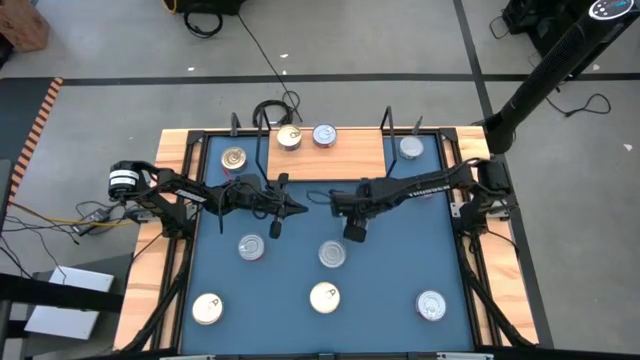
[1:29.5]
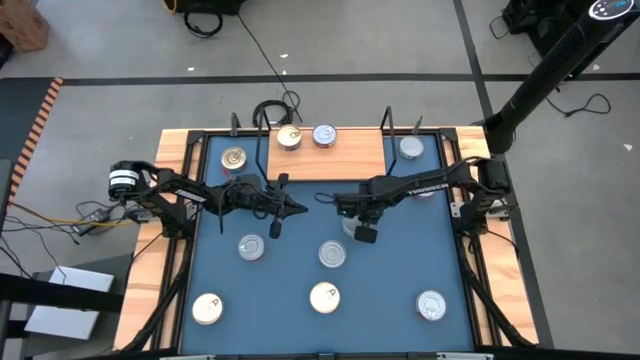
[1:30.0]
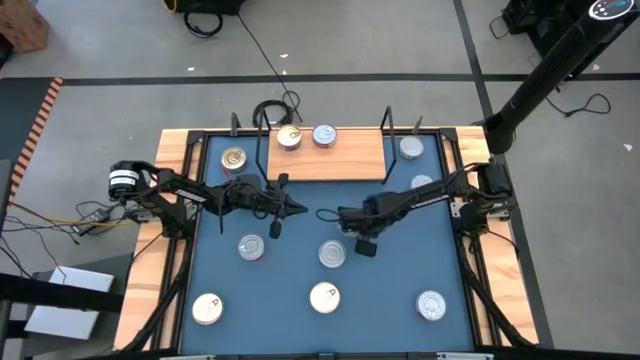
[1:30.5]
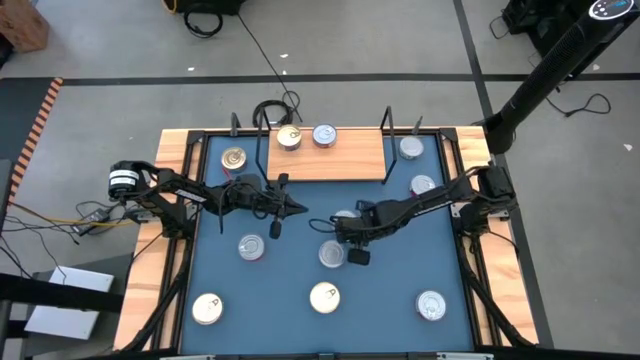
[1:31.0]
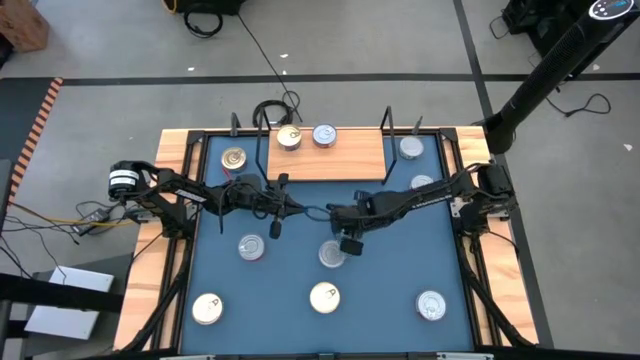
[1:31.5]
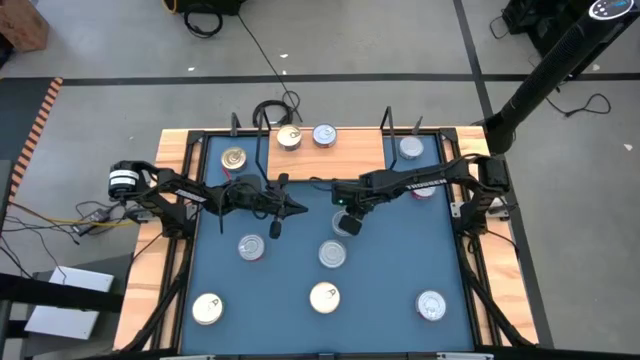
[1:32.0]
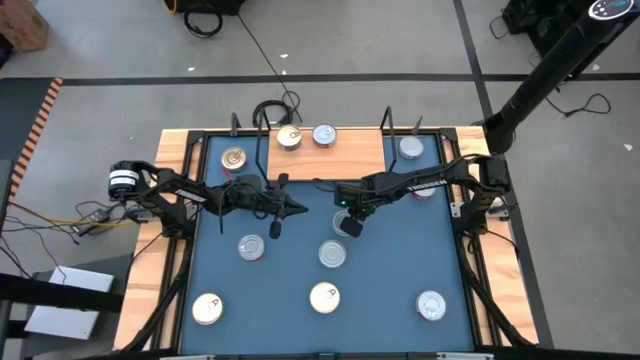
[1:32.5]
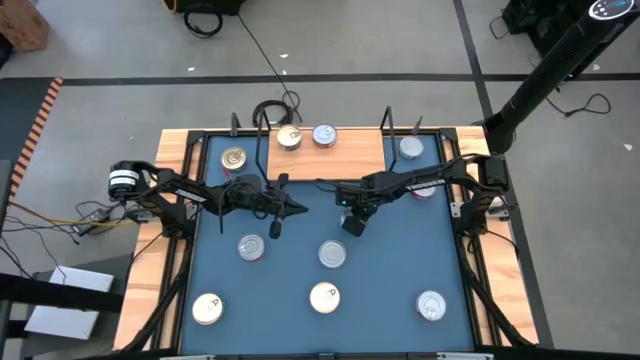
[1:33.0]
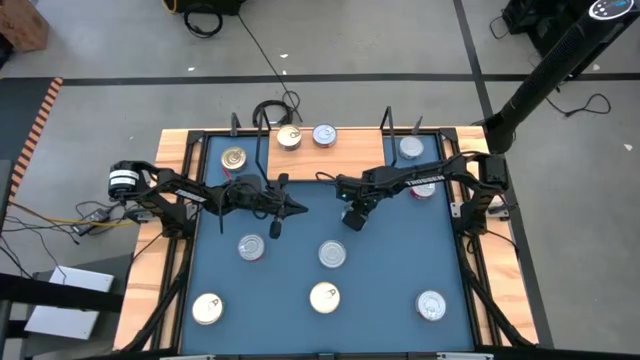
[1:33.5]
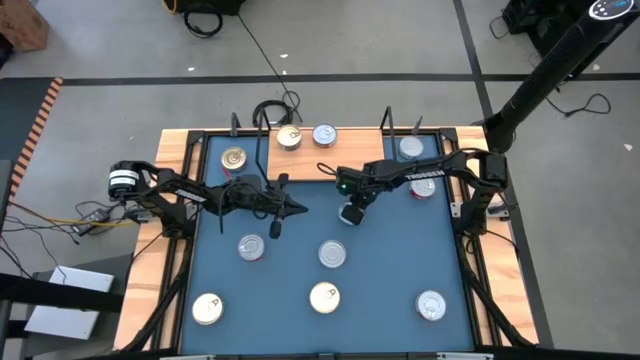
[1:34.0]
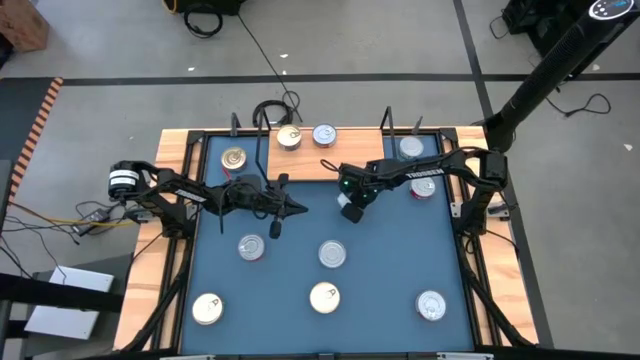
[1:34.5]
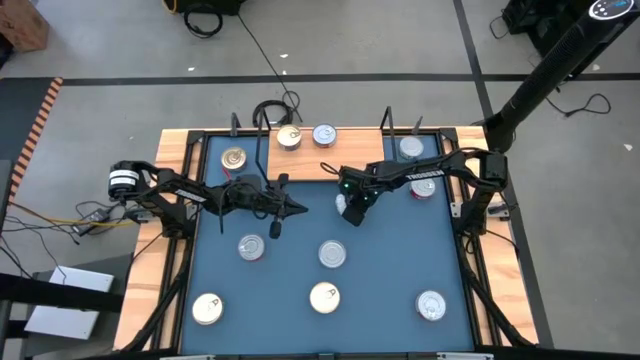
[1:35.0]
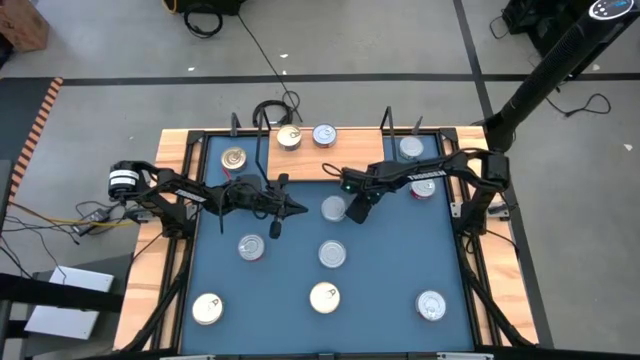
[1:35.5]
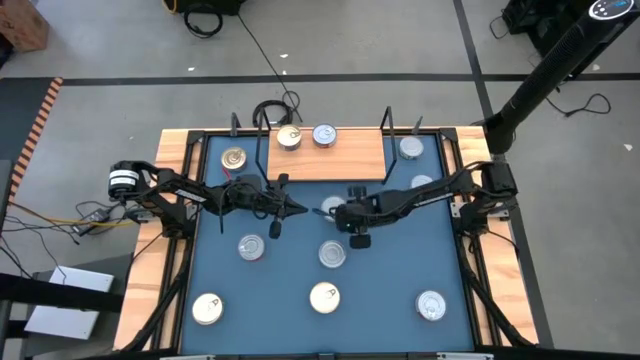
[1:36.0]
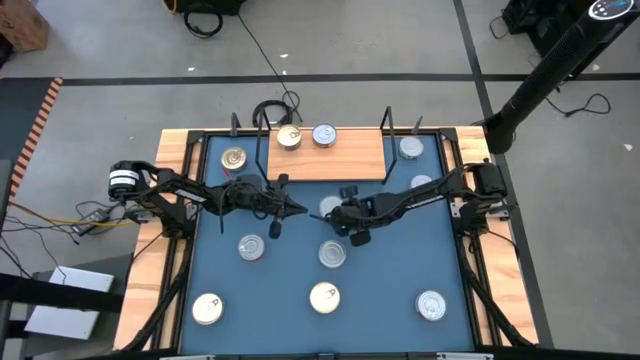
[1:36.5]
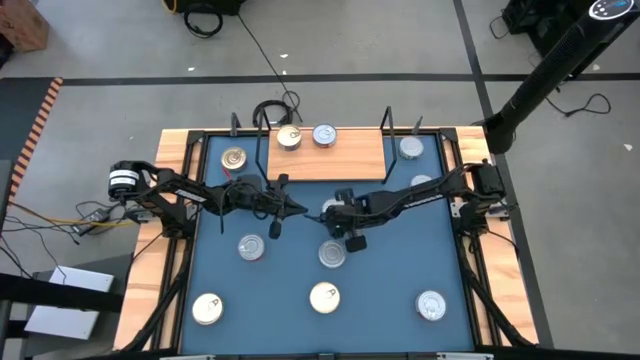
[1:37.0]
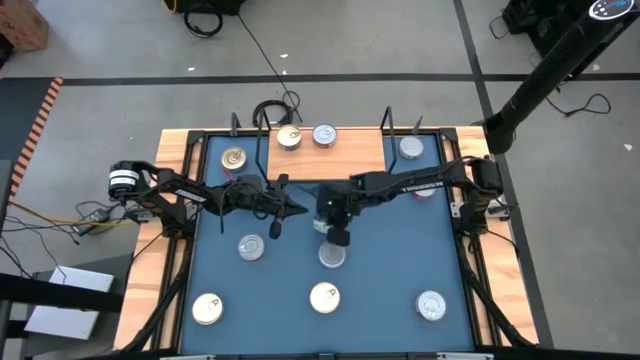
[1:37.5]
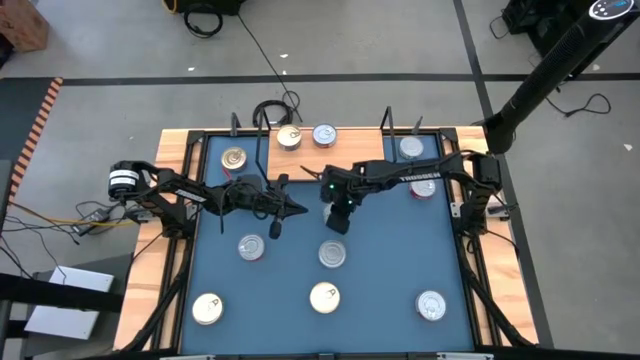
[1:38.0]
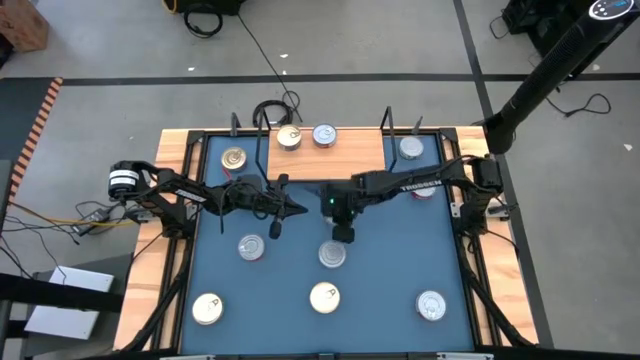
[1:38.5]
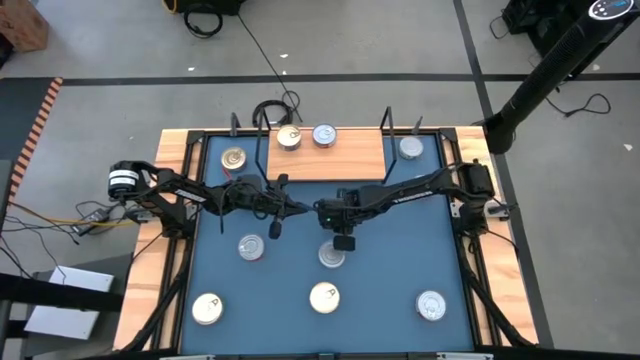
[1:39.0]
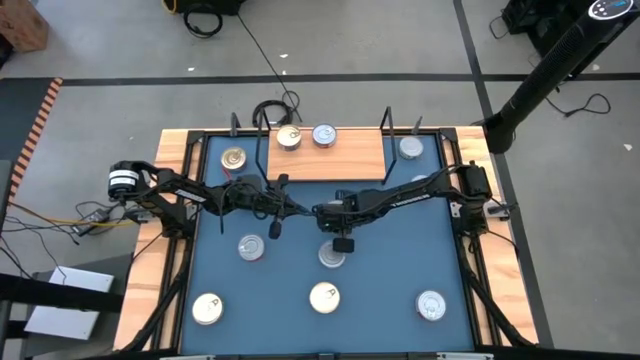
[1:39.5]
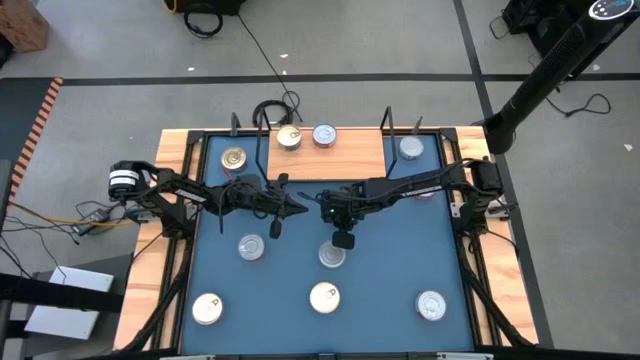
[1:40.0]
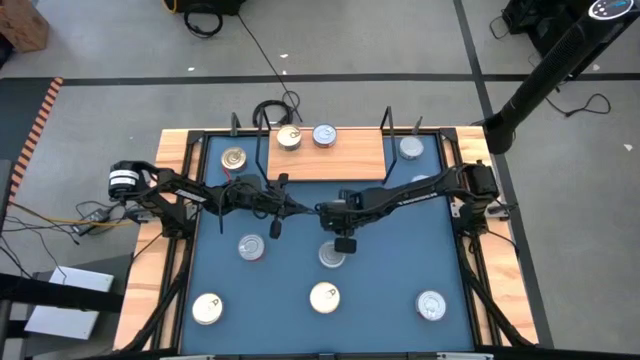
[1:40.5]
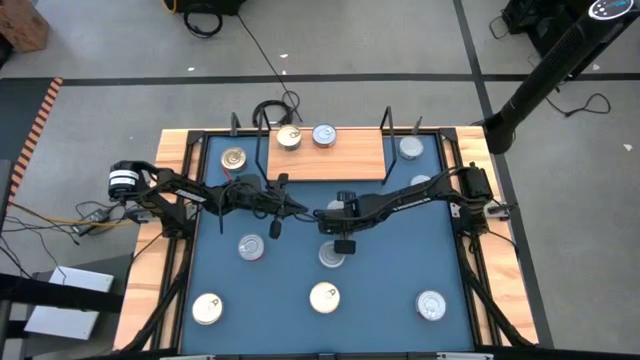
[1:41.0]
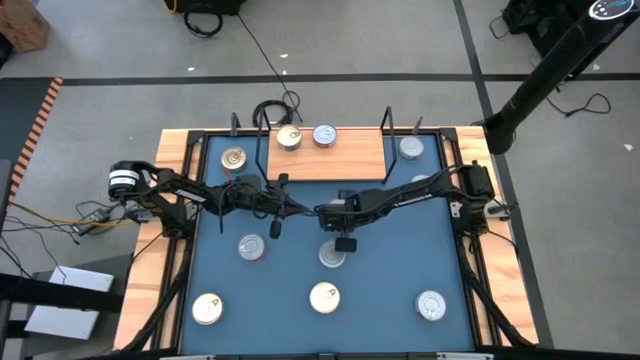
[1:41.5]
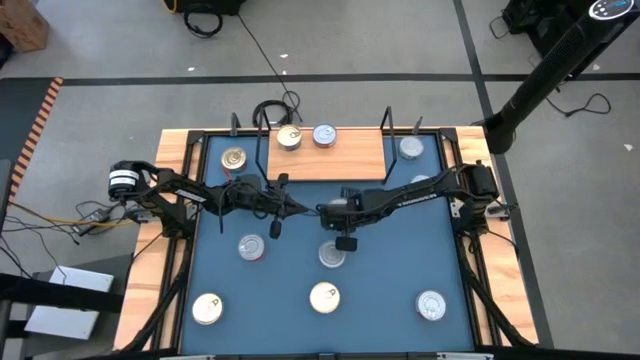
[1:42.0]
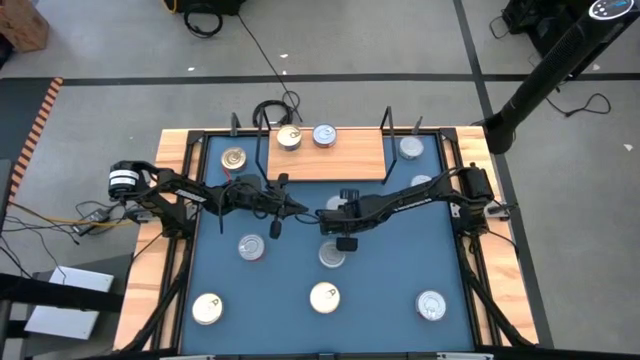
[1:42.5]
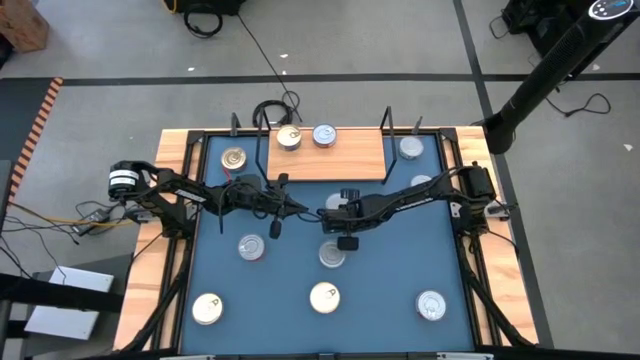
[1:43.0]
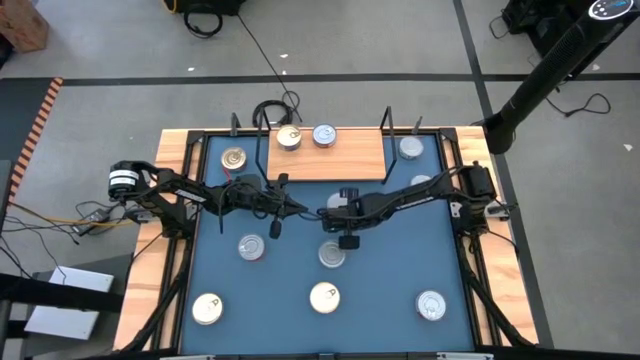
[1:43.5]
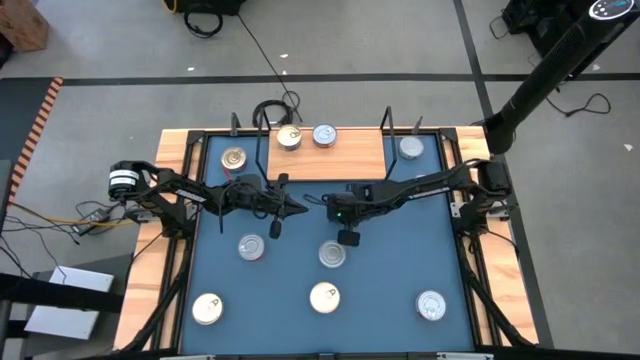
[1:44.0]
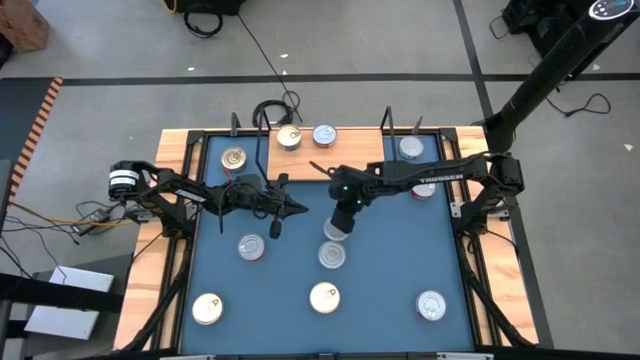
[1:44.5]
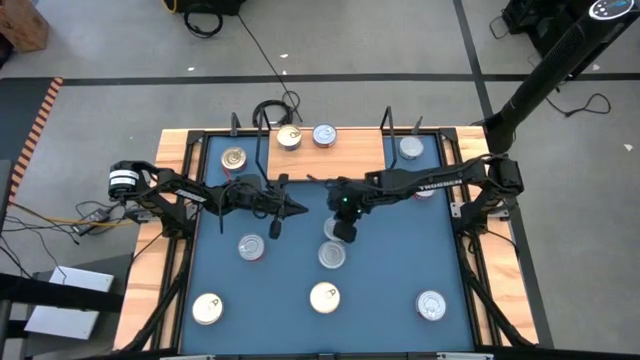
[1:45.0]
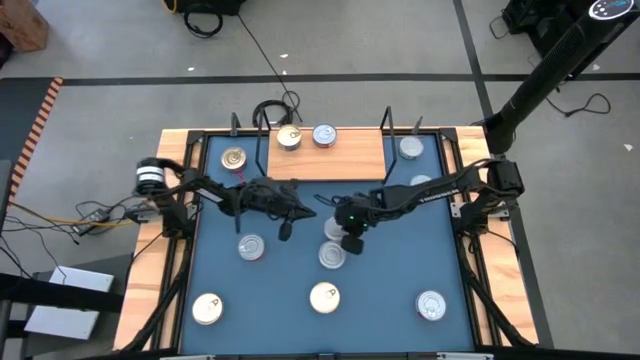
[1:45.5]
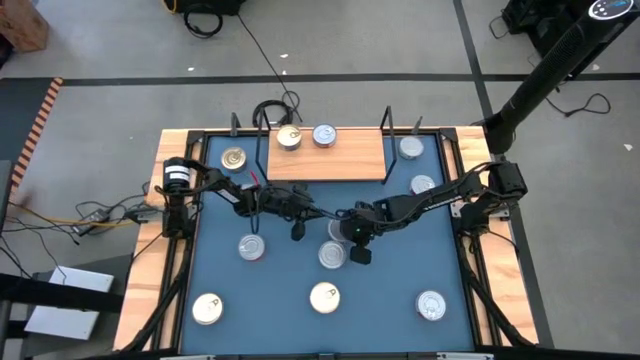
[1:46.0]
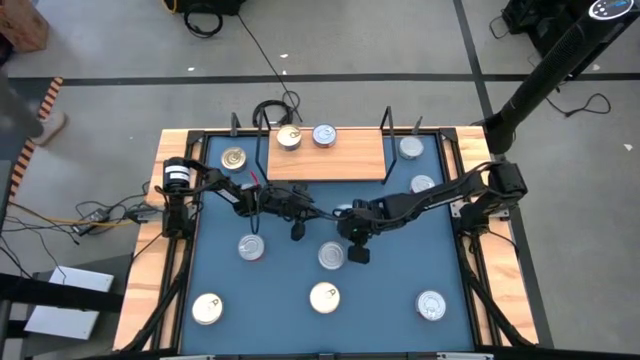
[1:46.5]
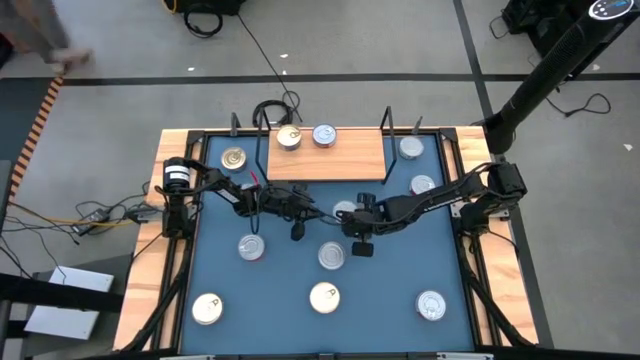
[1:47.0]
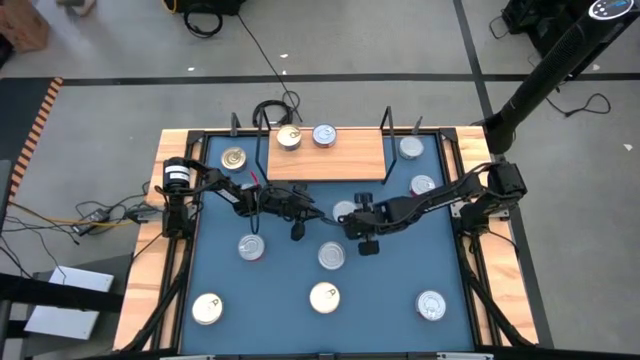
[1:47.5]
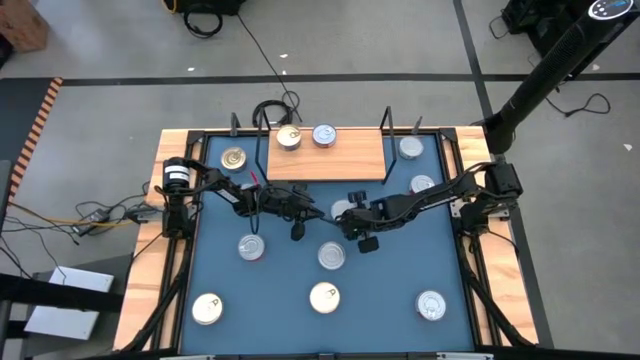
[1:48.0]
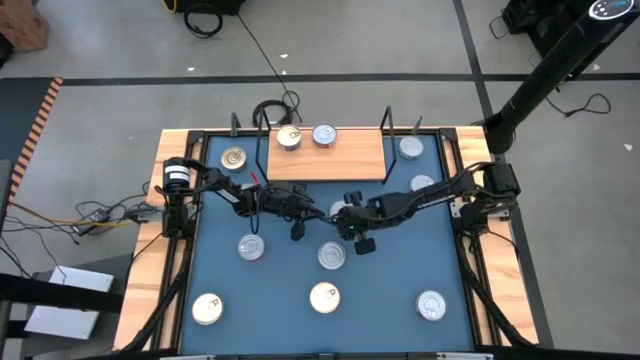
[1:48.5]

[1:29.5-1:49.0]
Task: Stack canned seafood by type on shelf
Put the bottom right white tuna can on the shelf

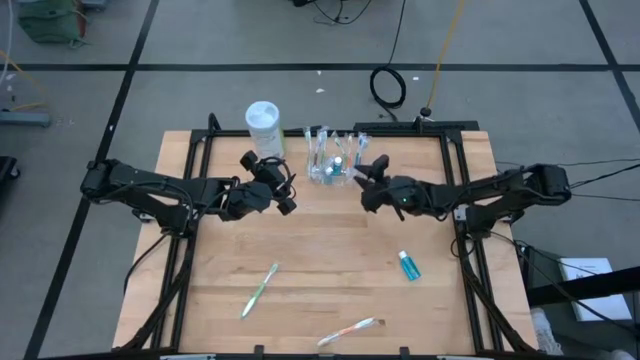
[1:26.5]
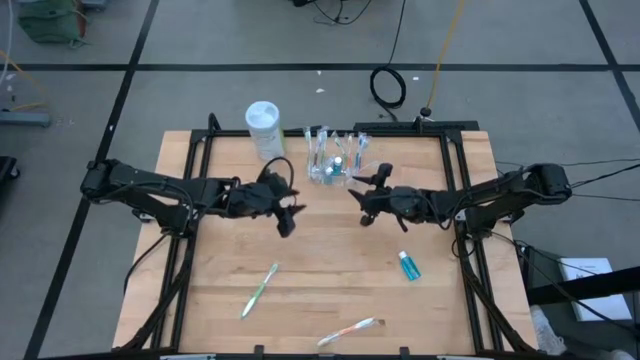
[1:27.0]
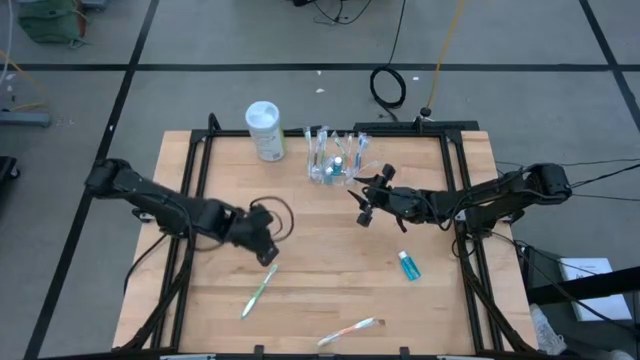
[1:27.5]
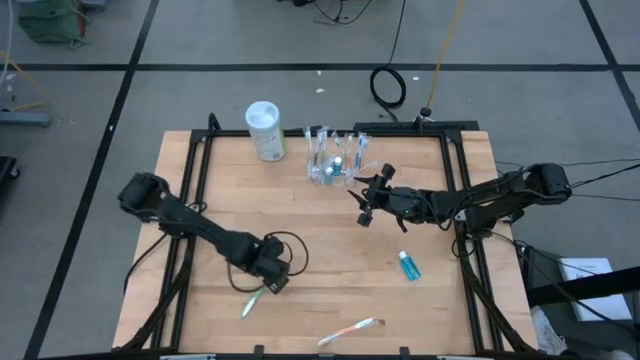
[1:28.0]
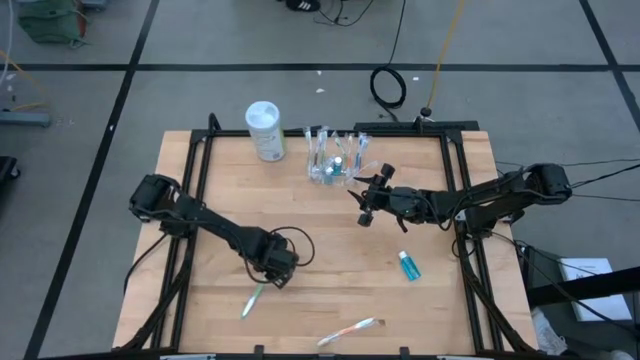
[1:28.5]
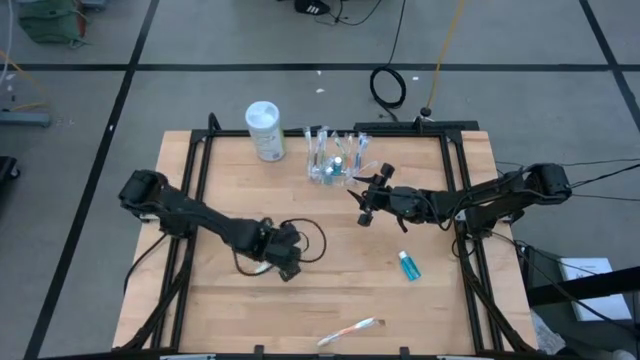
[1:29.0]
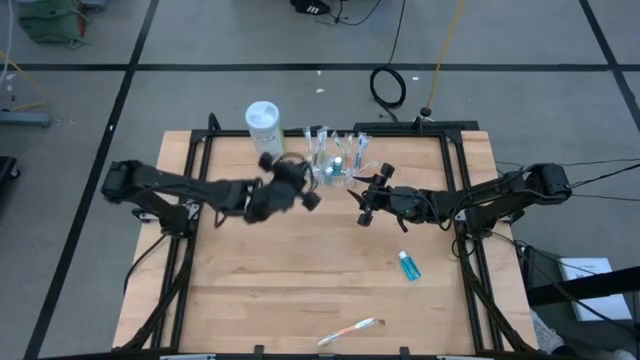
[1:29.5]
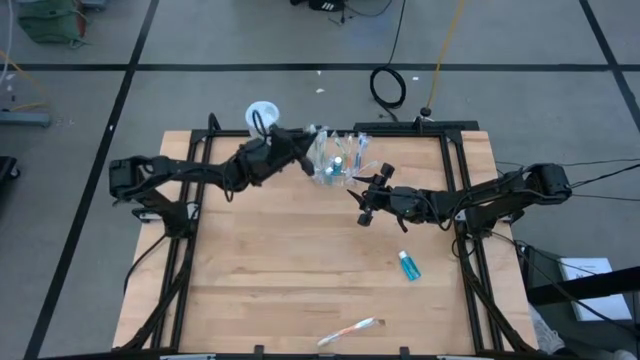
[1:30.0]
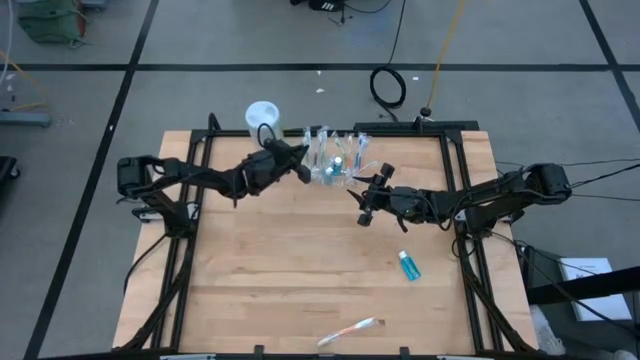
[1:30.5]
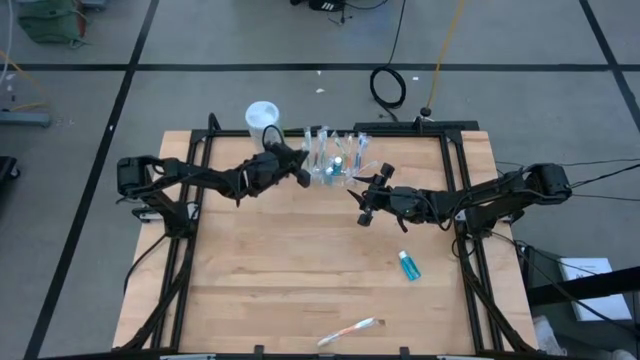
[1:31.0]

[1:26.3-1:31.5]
Task: Pick & Place toothbrushing station
Put the green toothbrush into the transparent organizer
